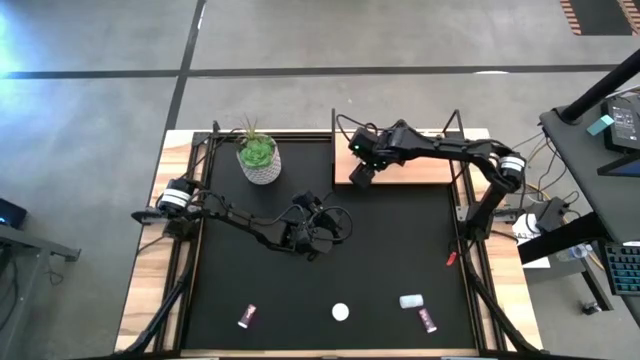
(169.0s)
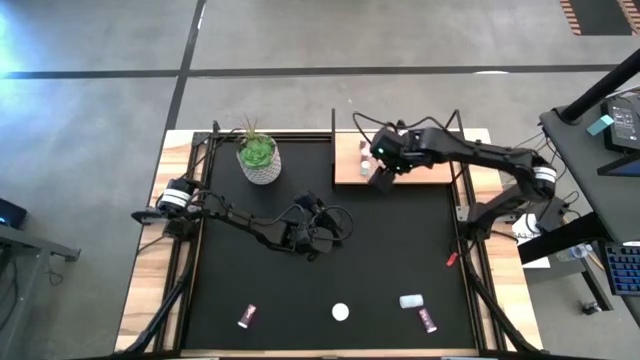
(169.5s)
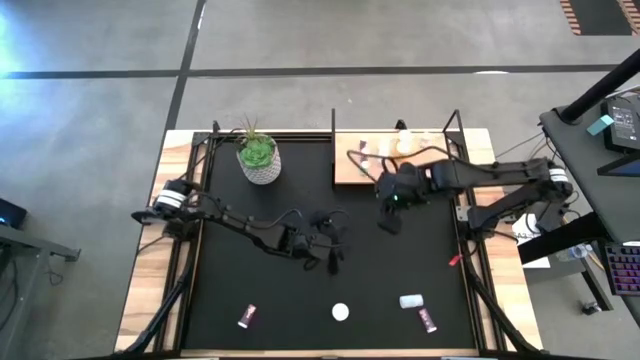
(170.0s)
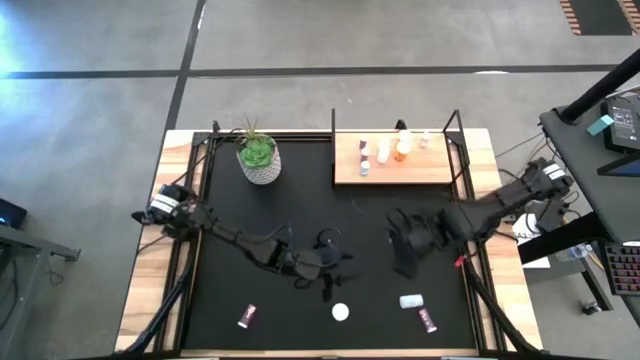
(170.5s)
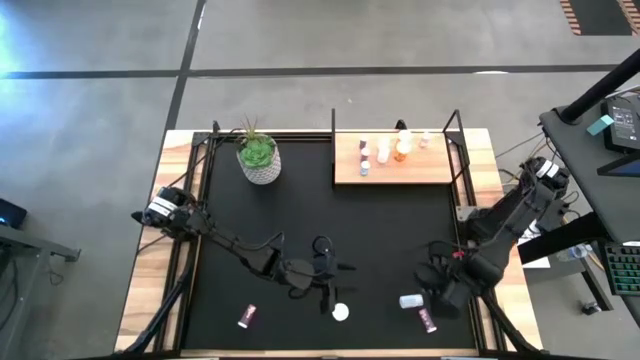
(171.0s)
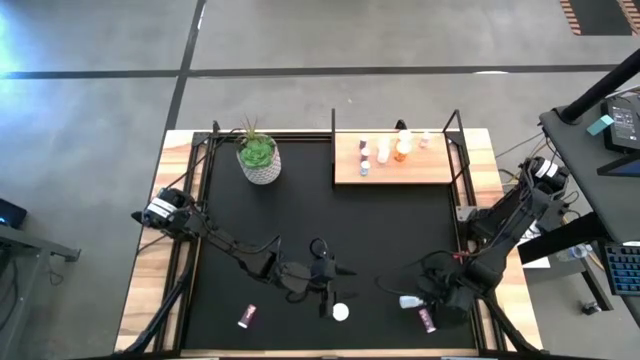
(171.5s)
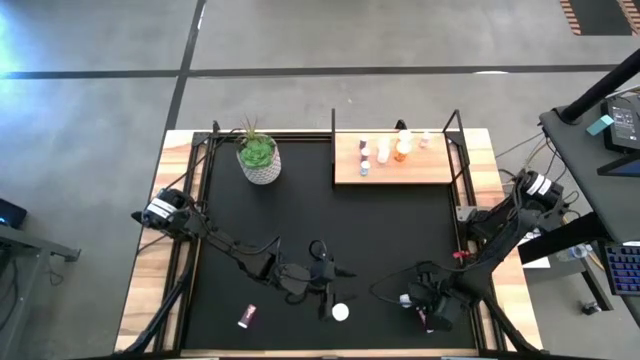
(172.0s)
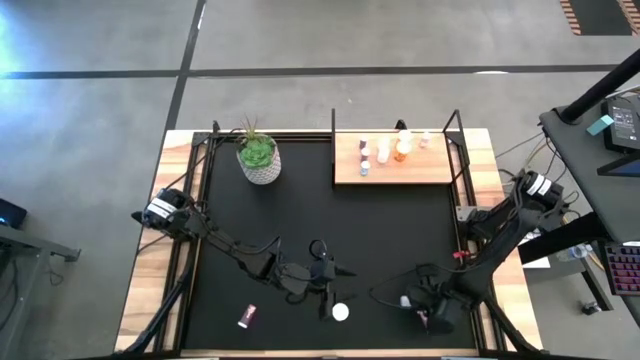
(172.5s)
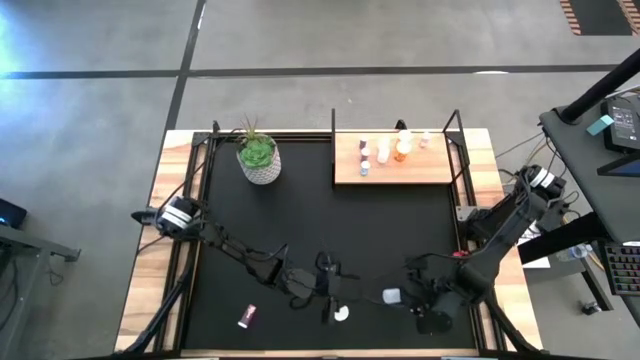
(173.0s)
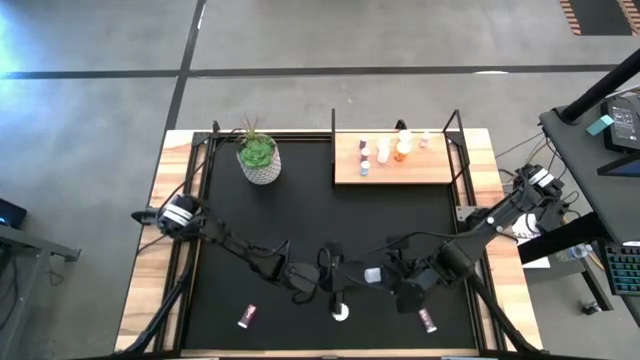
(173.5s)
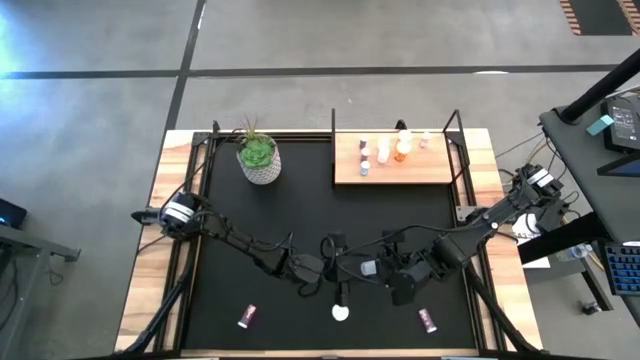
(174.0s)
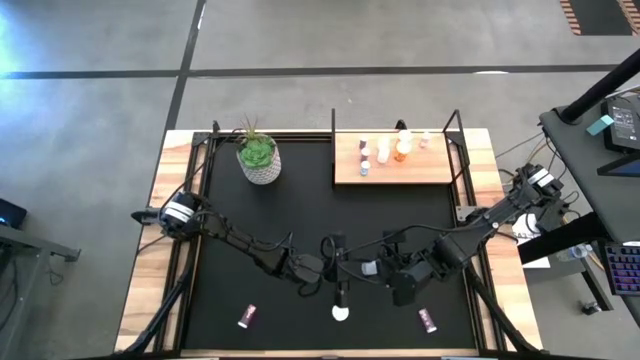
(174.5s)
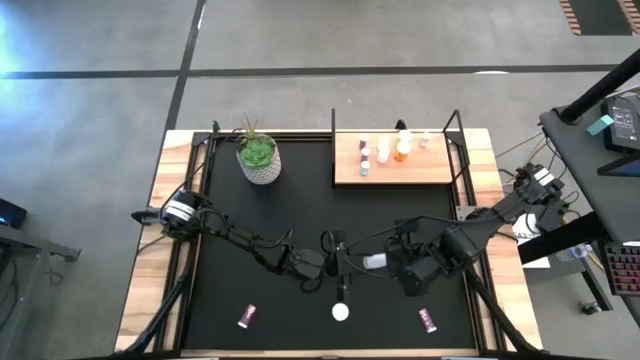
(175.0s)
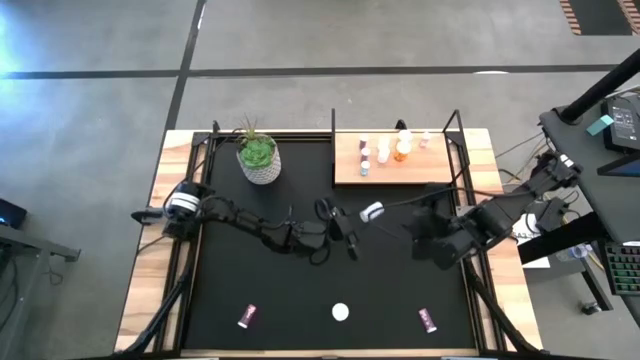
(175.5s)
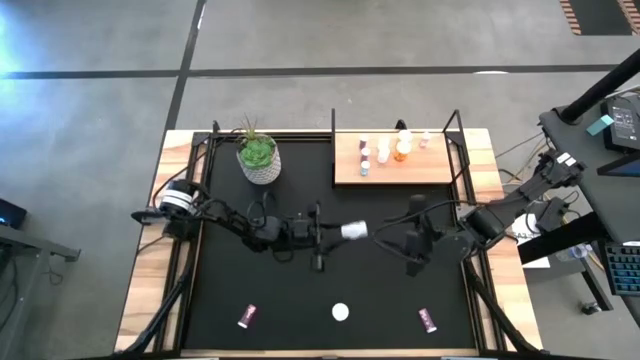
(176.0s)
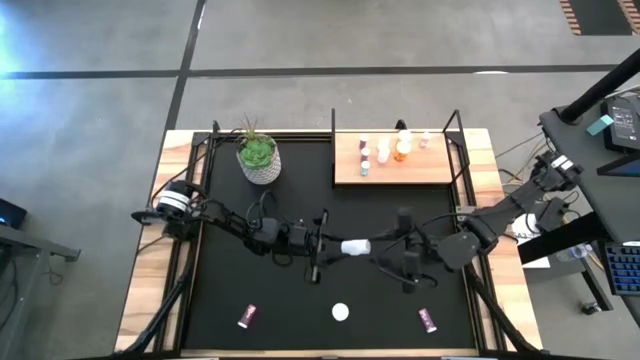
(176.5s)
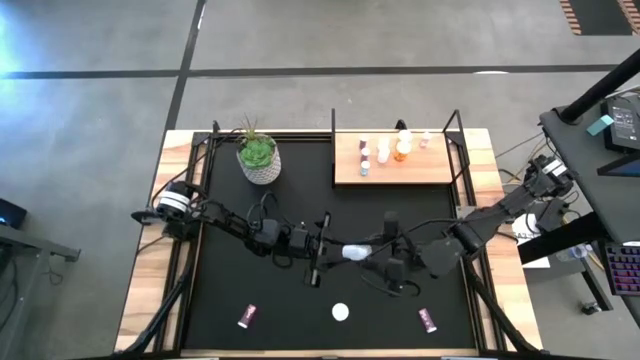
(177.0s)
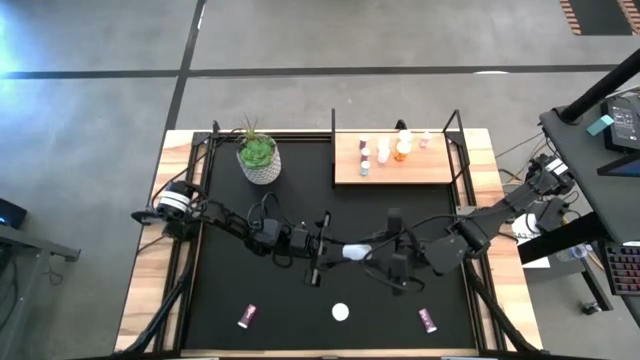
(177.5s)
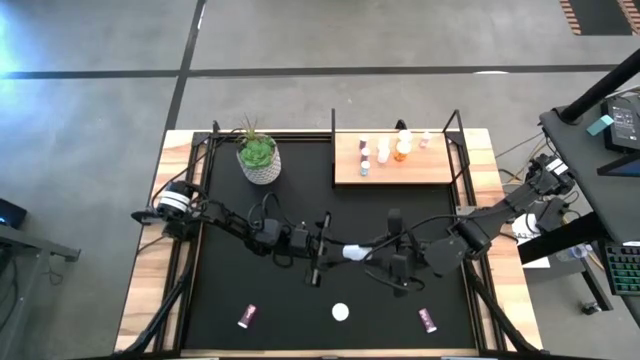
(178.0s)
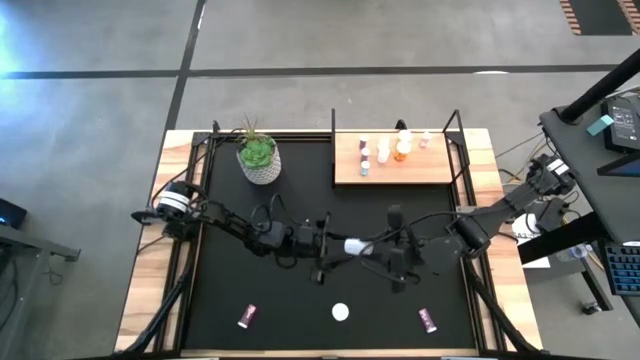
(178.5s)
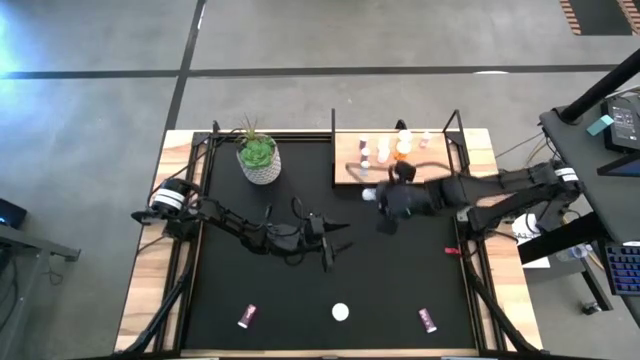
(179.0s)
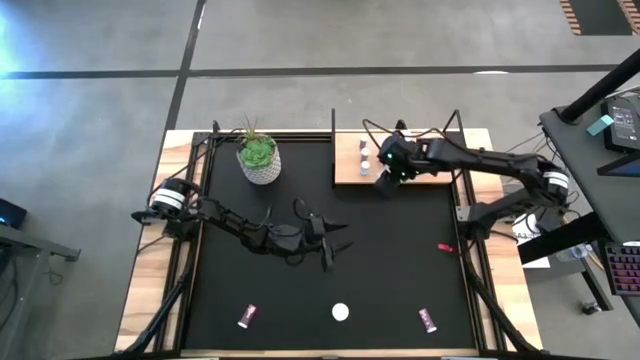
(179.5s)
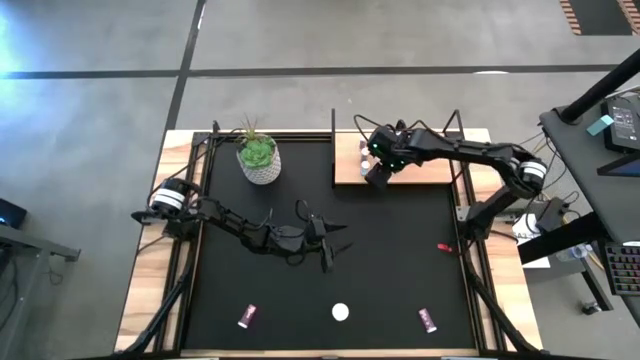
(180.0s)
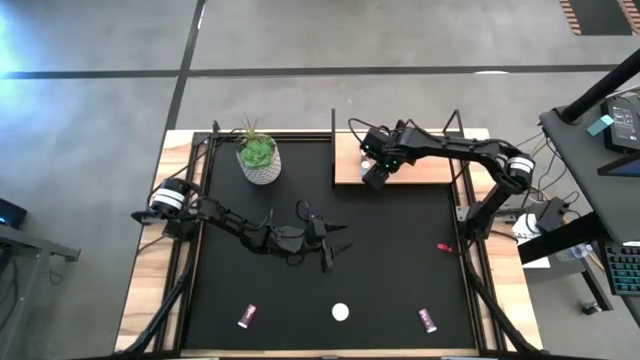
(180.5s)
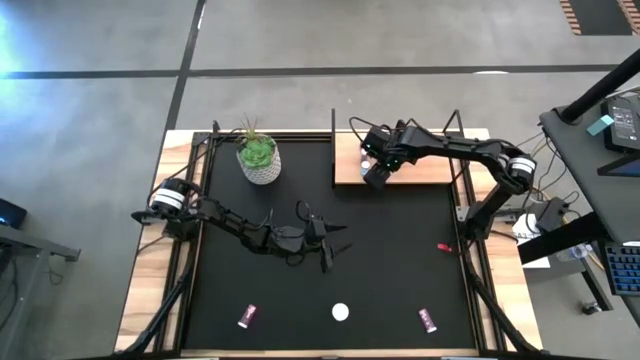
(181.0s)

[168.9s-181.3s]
Task: Pick and place medicine bottles onto shelf by color
Put the white pill bottle on the shelf aligned with the other white pill bottles

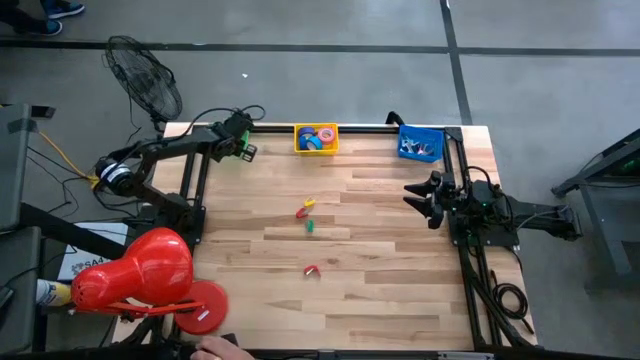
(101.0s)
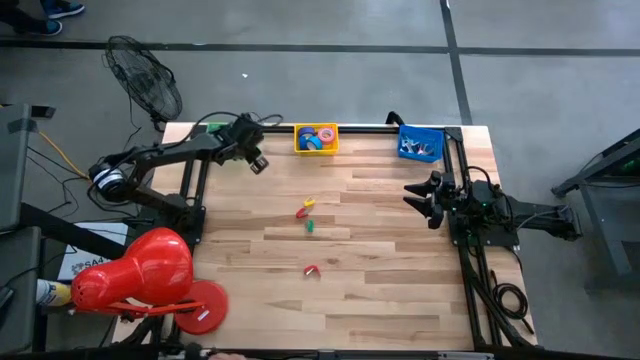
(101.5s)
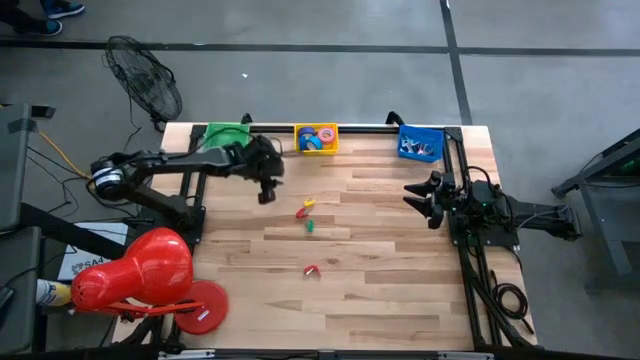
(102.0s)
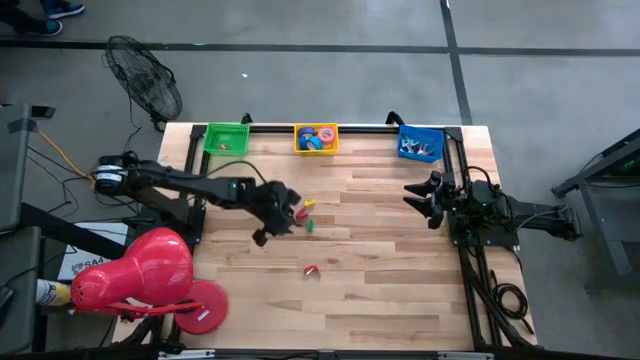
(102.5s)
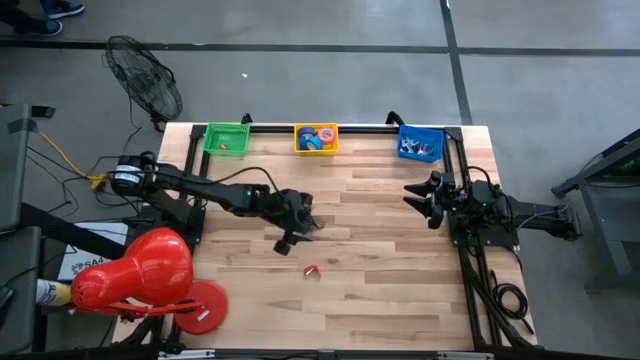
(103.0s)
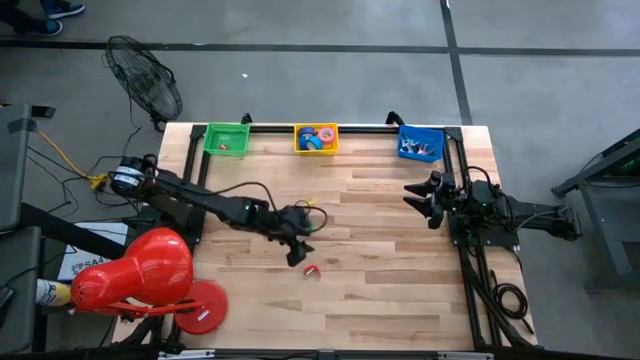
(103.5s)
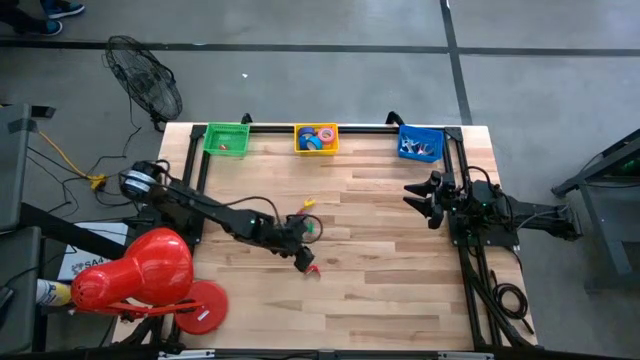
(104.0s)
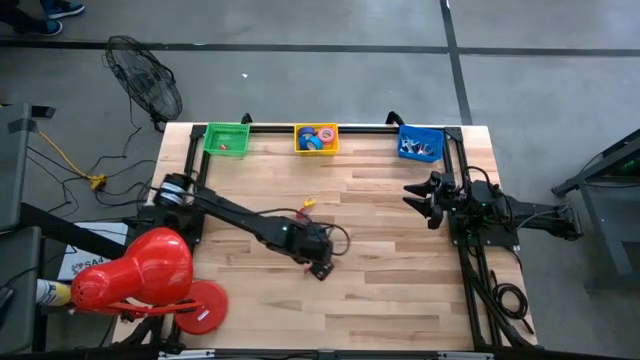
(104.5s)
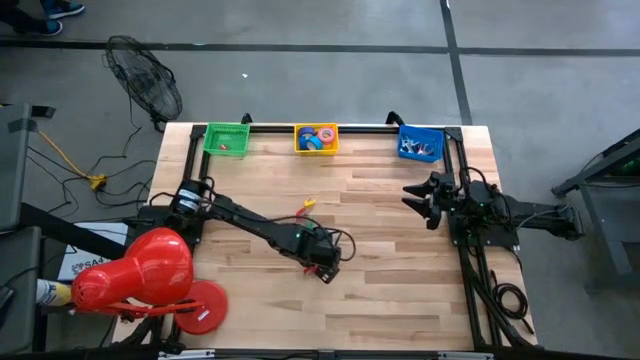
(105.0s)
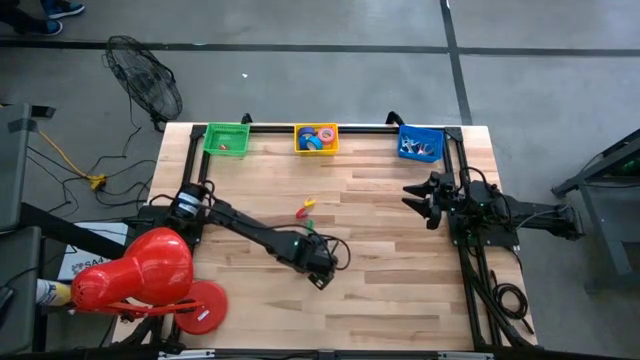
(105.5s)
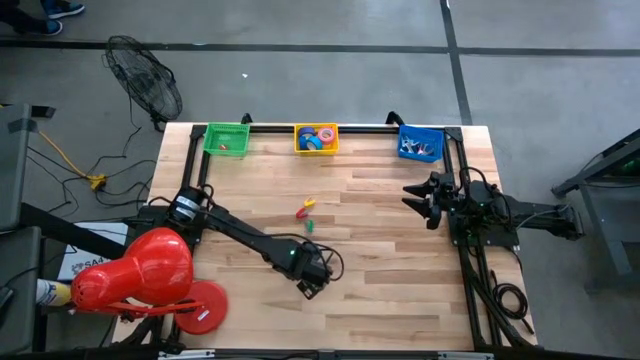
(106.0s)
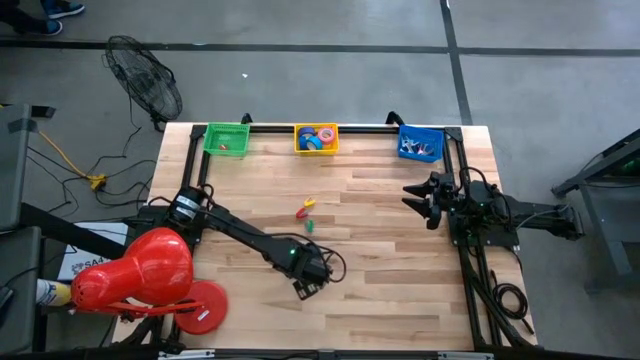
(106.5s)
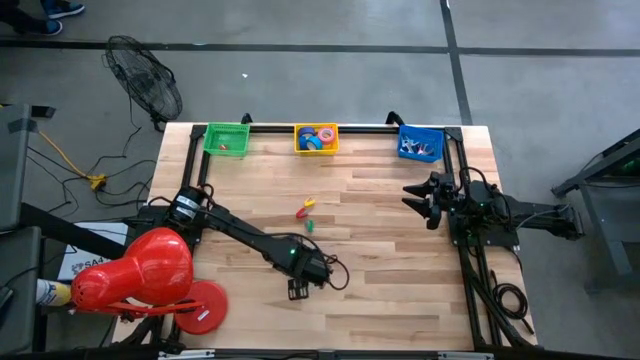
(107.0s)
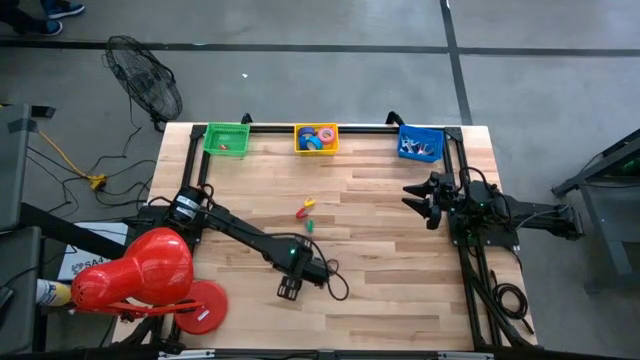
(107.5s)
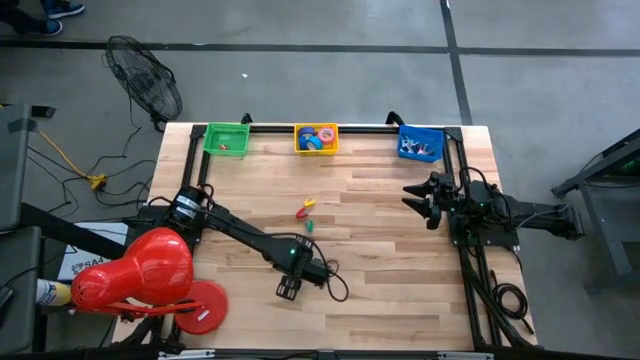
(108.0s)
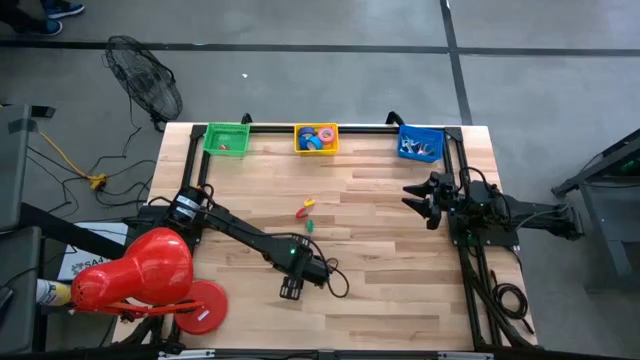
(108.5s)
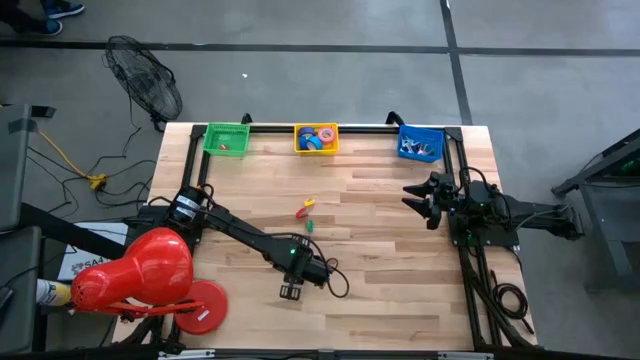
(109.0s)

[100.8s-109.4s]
Task: Pick and place Stapler, Stapler remover, tape
Put the red stapler into the green bin
